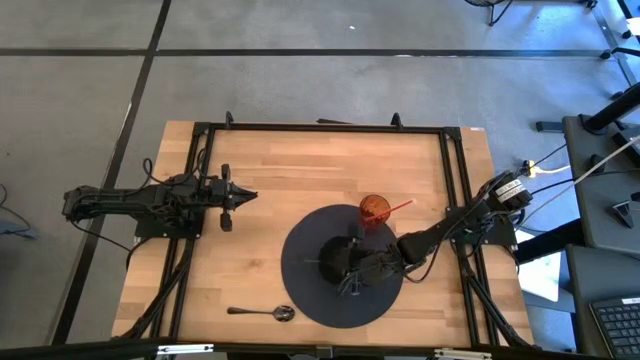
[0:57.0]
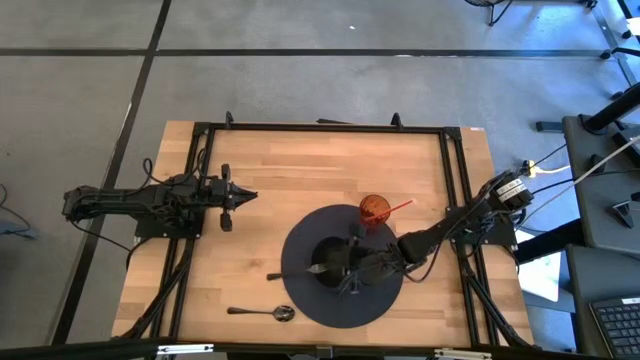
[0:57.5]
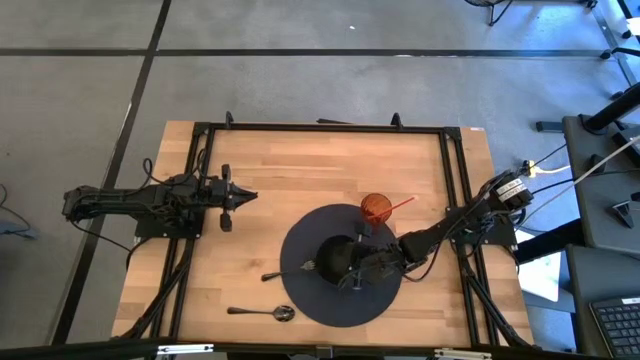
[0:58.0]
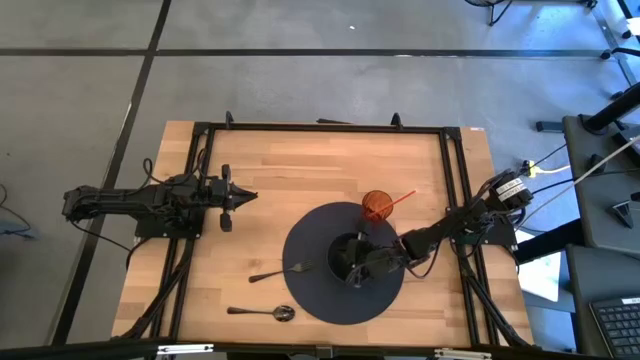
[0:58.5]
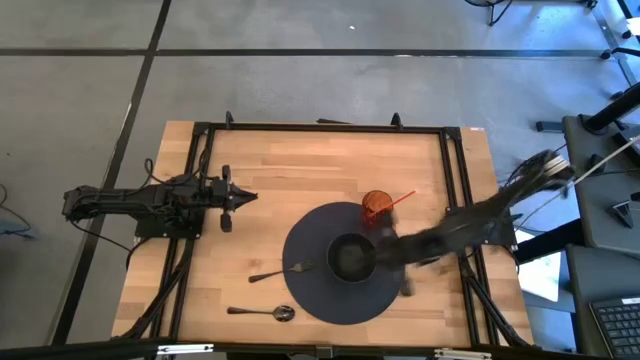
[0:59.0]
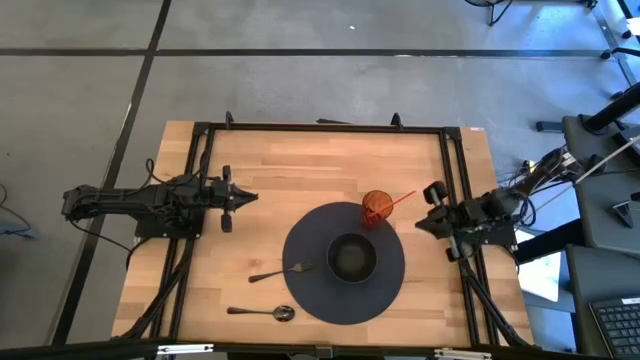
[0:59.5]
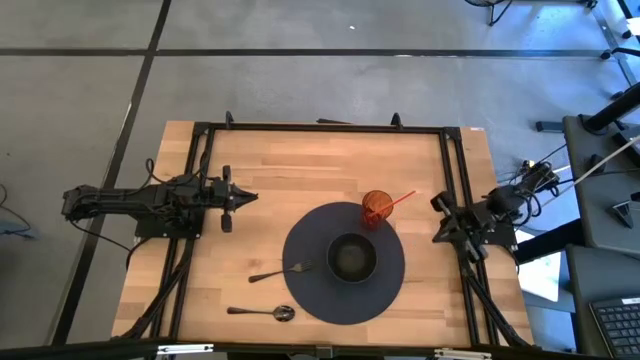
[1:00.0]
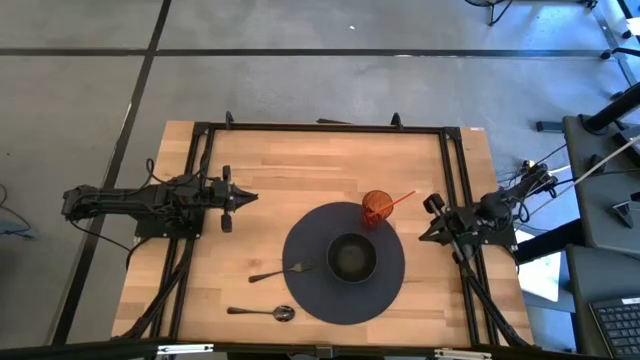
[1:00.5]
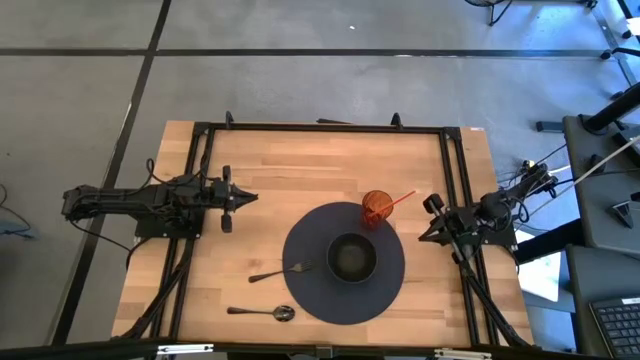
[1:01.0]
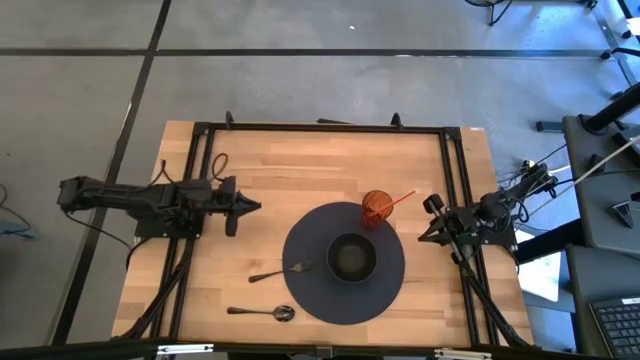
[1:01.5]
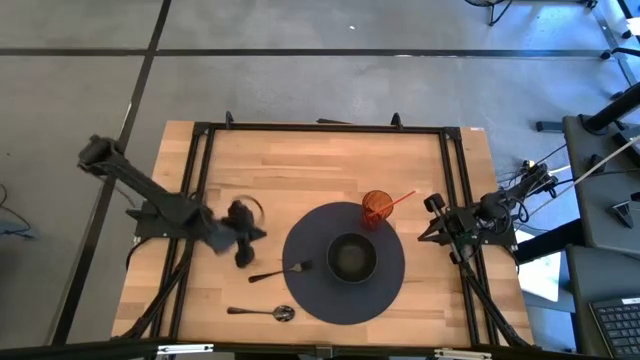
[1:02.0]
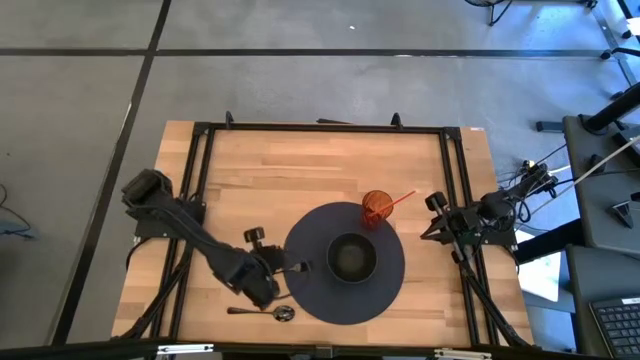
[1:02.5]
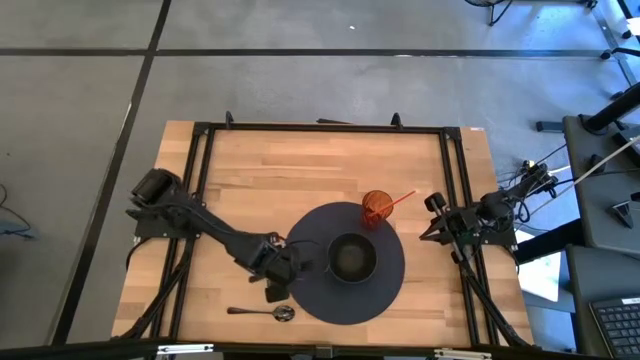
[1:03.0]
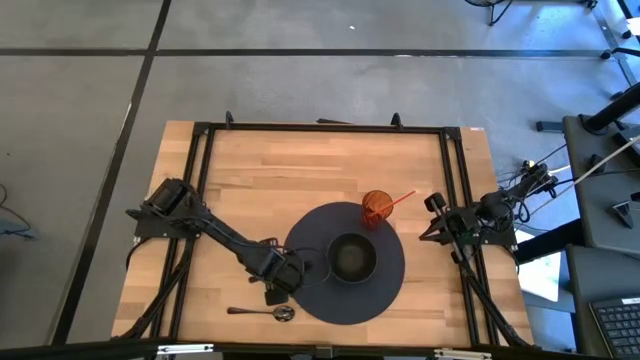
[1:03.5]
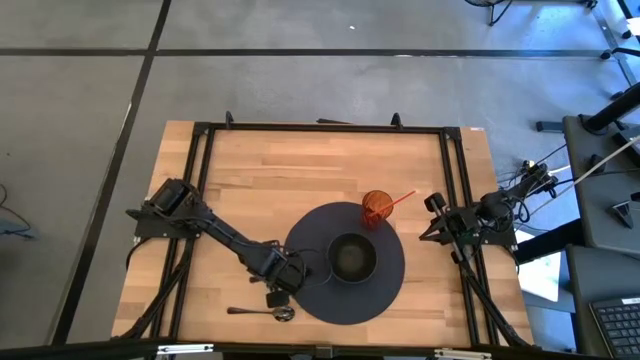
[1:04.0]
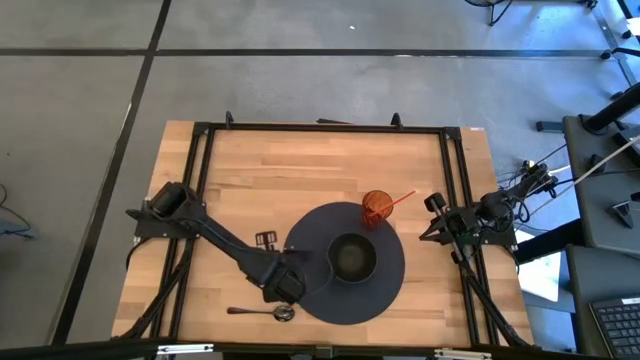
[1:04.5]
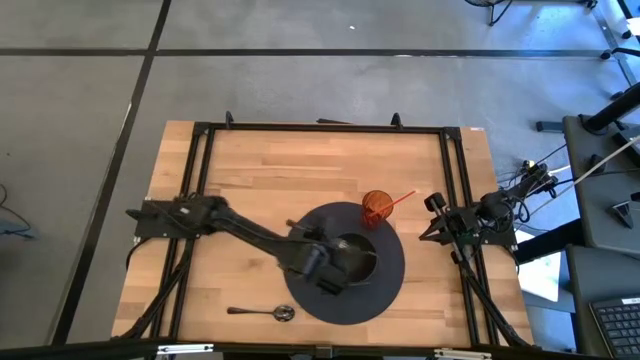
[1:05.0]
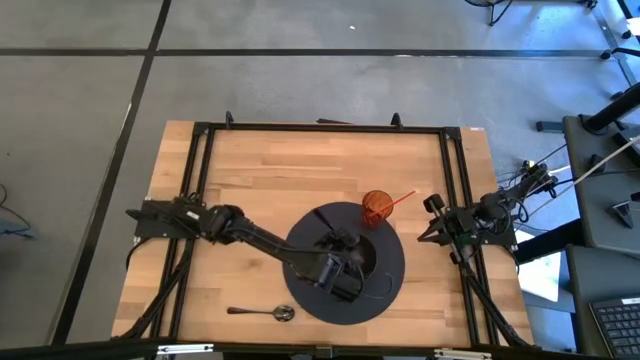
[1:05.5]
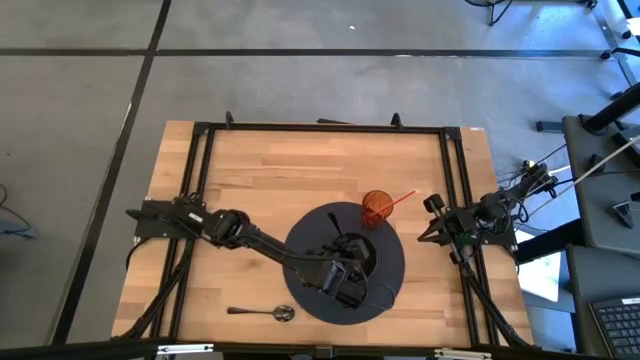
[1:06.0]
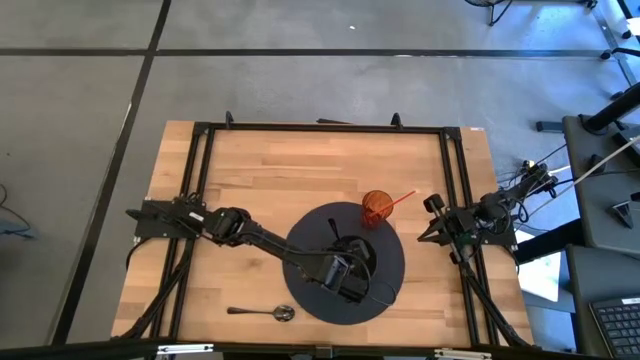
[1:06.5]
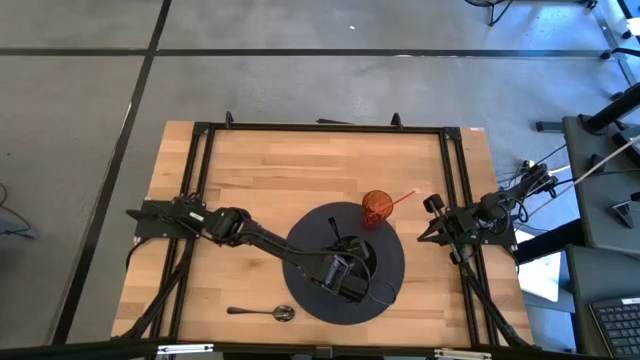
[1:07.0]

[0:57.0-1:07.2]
Task: Pick & Place Utensil
Put the black fork into the black bowl

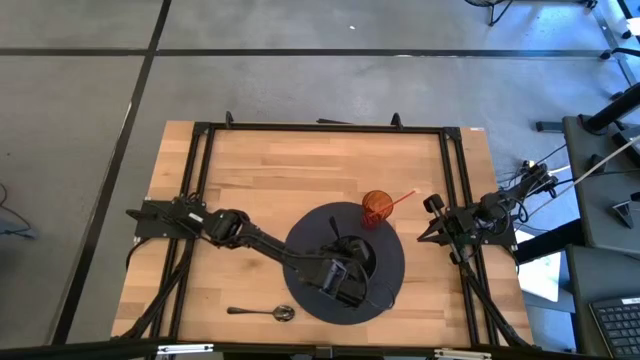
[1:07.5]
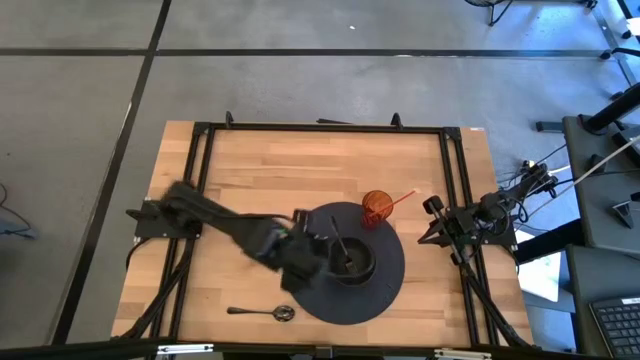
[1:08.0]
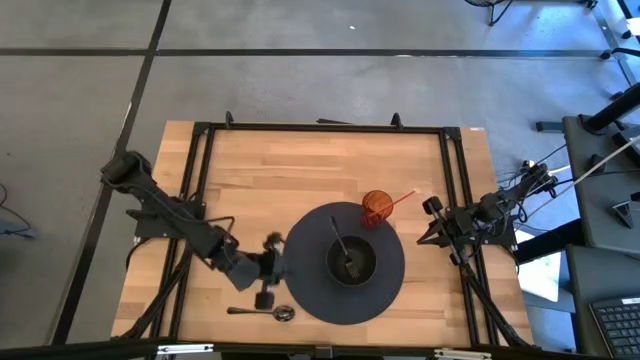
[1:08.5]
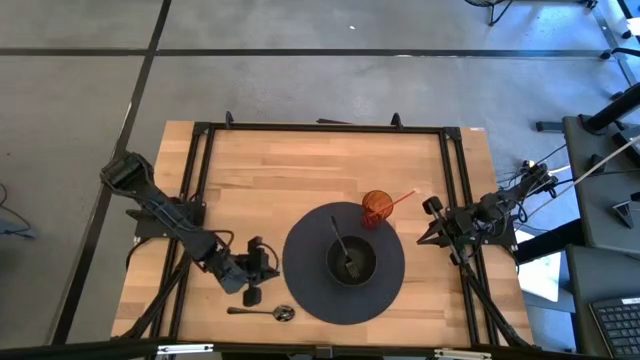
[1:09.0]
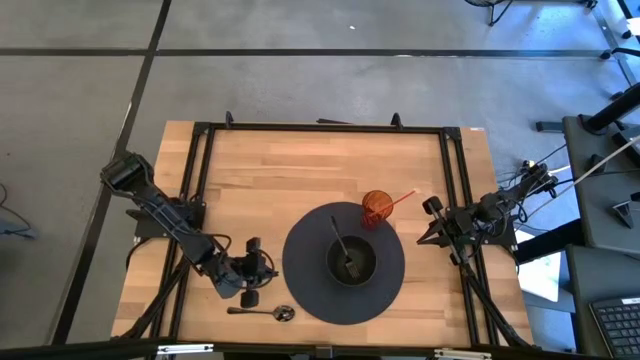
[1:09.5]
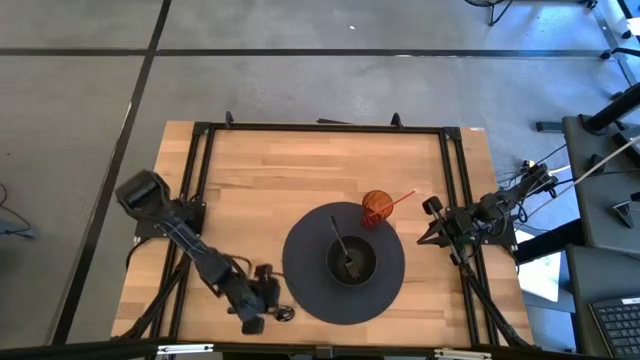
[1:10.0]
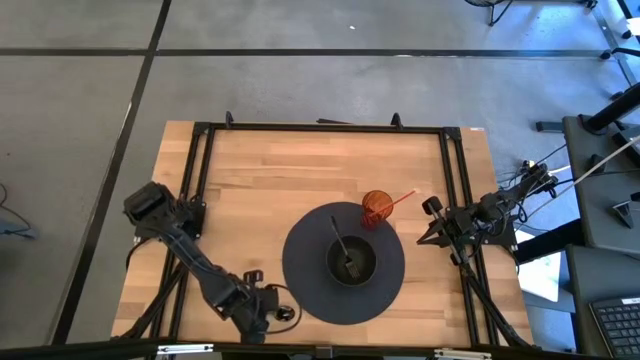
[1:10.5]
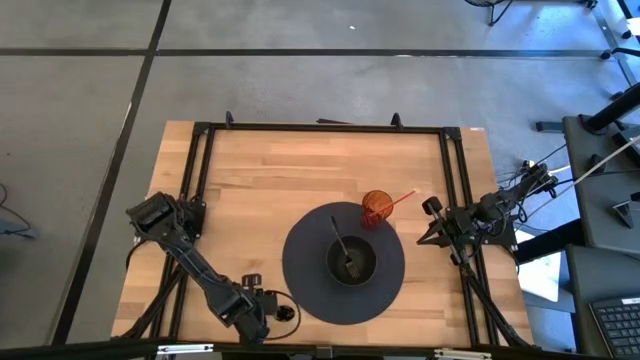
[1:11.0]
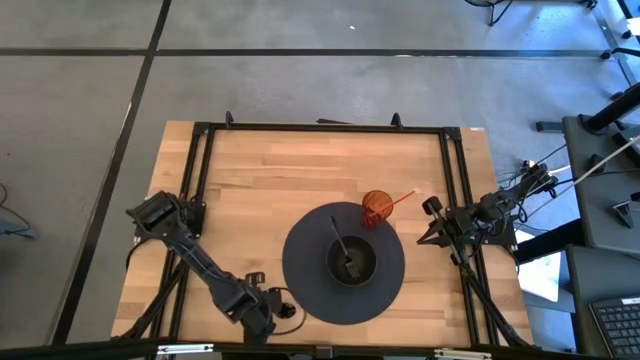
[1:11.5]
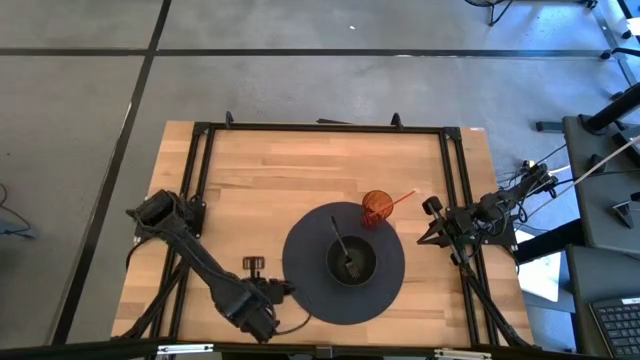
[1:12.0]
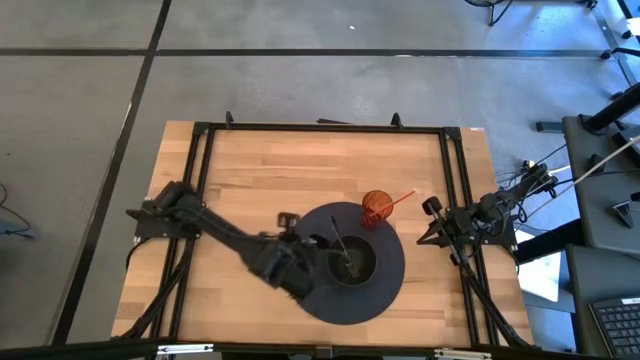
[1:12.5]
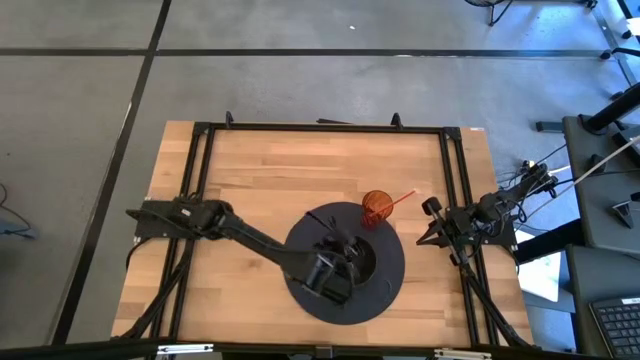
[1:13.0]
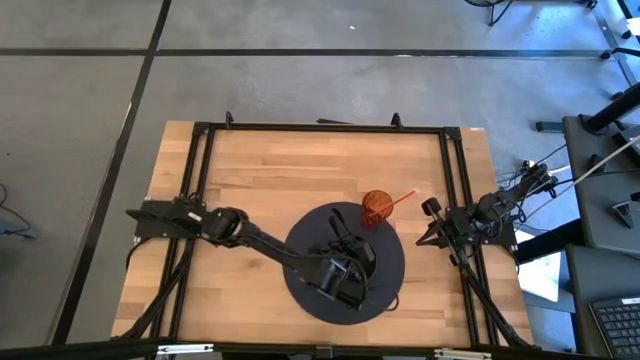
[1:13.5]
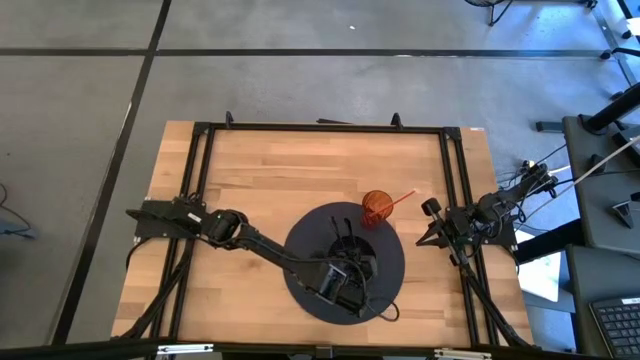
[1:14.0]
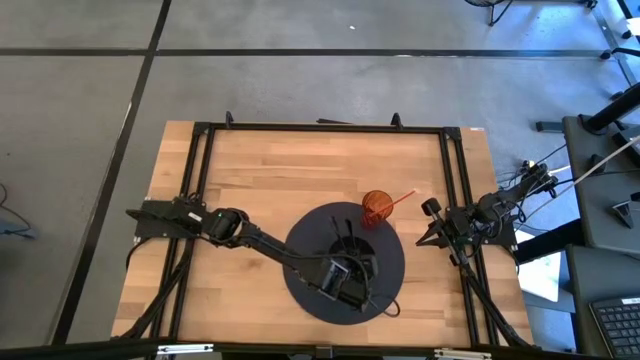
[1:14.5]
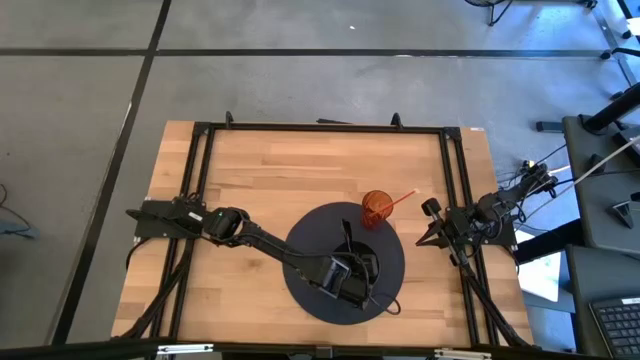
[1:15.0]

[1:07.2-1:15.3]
Put the black spoon into the black bowl
